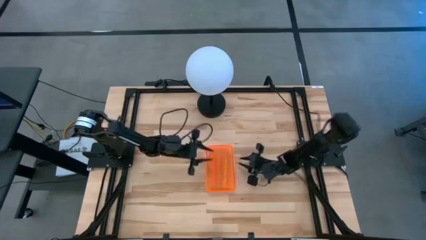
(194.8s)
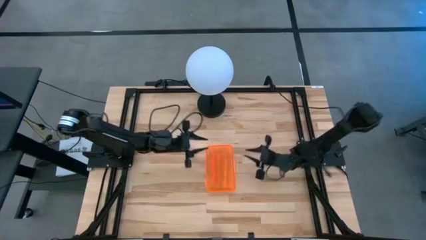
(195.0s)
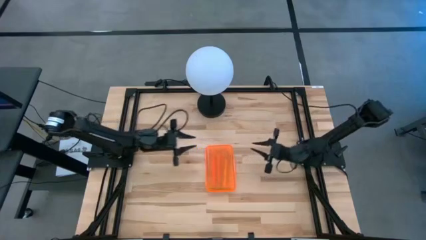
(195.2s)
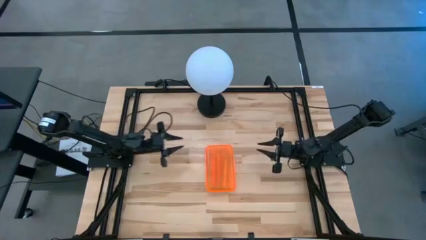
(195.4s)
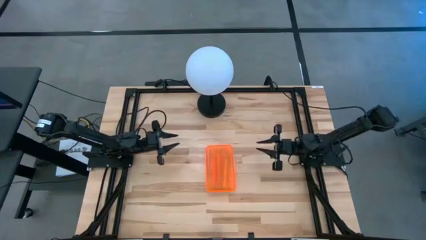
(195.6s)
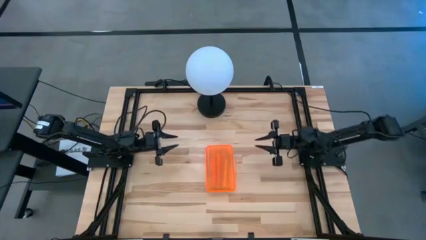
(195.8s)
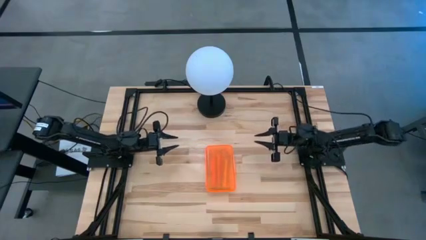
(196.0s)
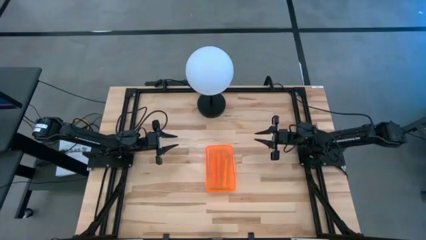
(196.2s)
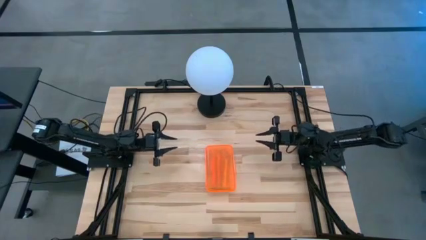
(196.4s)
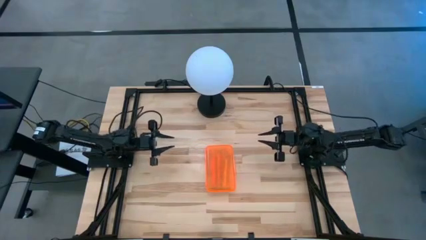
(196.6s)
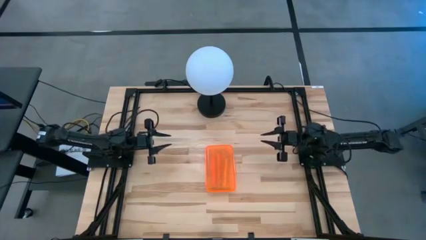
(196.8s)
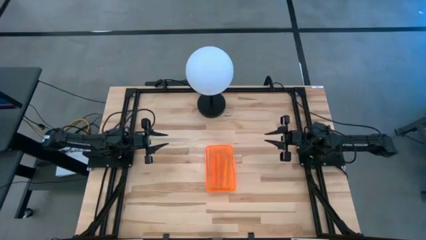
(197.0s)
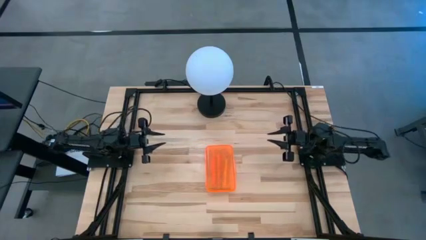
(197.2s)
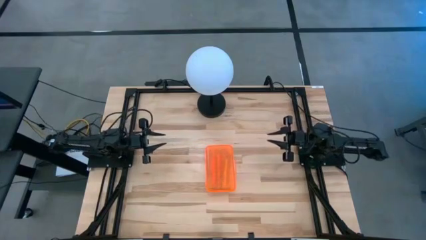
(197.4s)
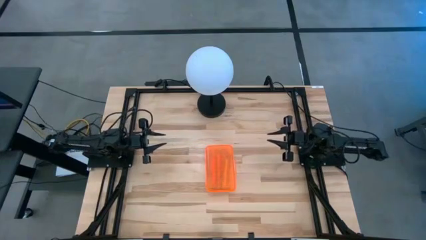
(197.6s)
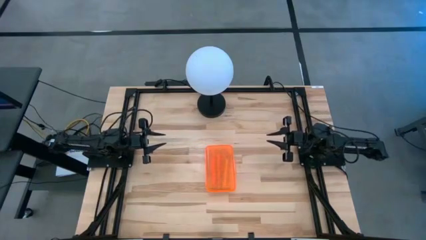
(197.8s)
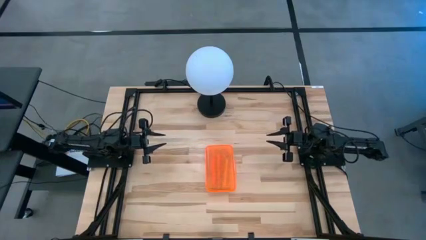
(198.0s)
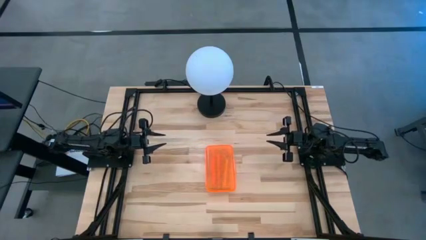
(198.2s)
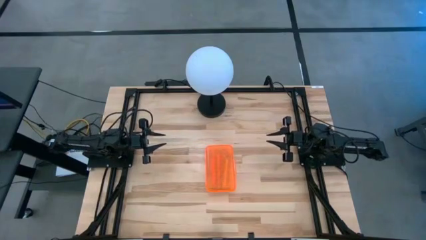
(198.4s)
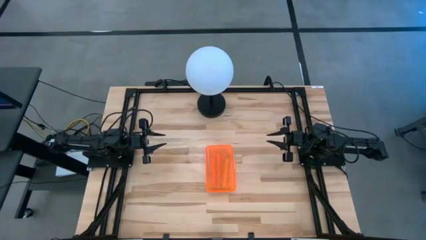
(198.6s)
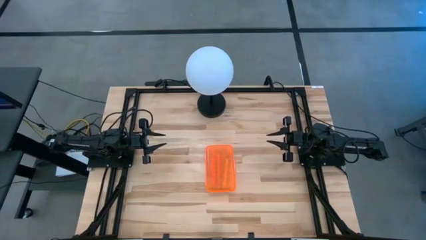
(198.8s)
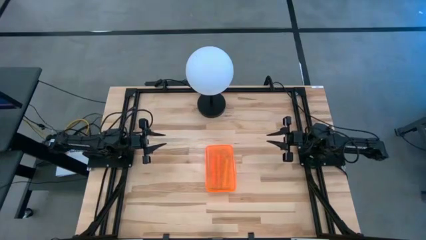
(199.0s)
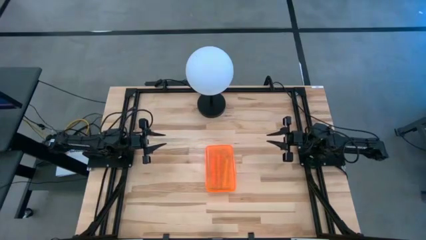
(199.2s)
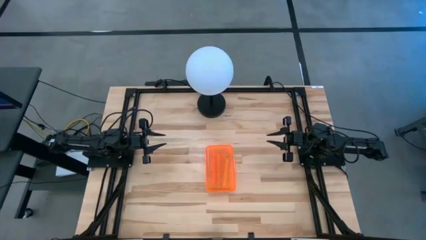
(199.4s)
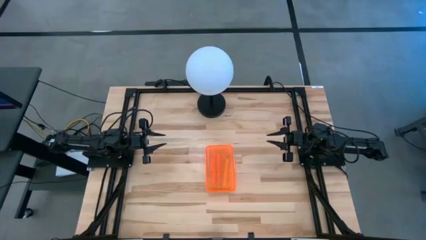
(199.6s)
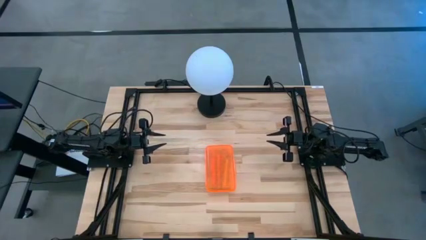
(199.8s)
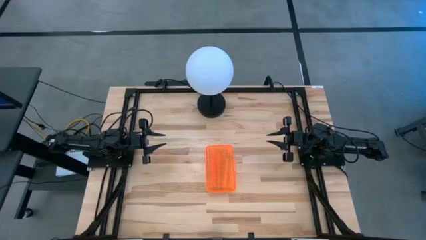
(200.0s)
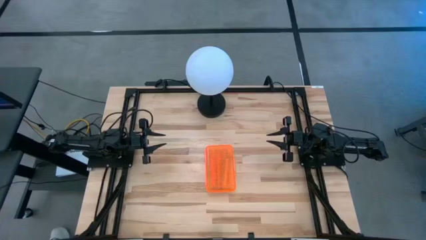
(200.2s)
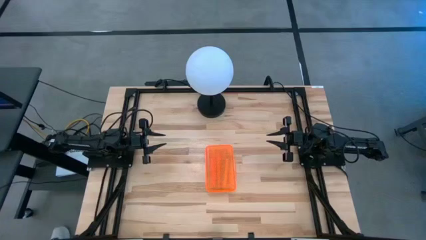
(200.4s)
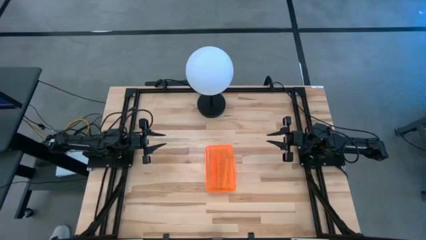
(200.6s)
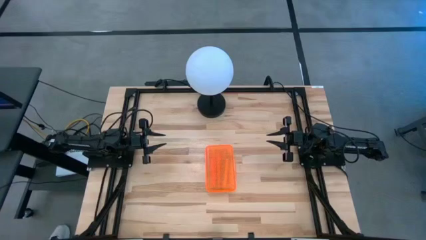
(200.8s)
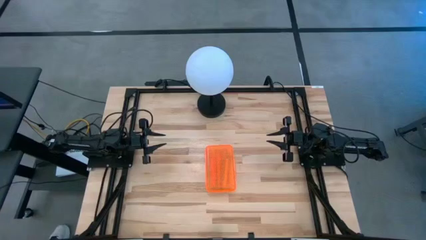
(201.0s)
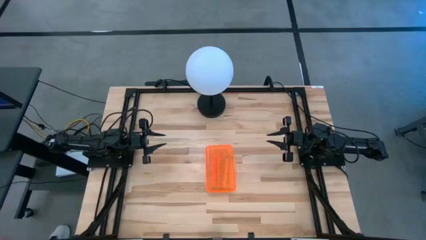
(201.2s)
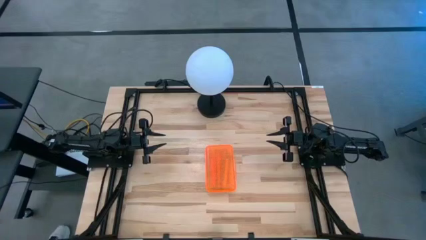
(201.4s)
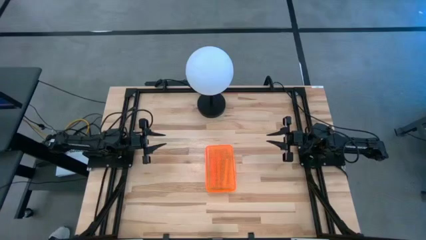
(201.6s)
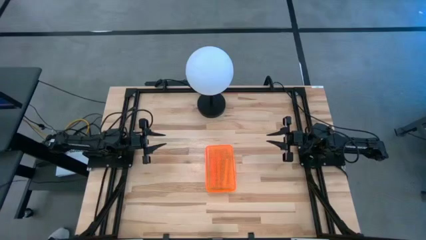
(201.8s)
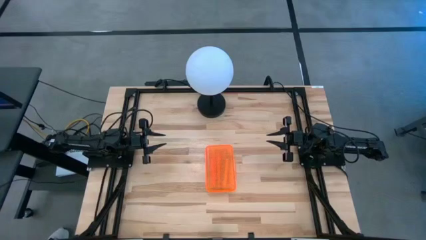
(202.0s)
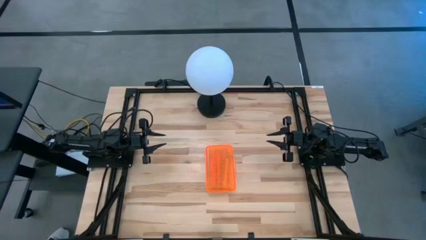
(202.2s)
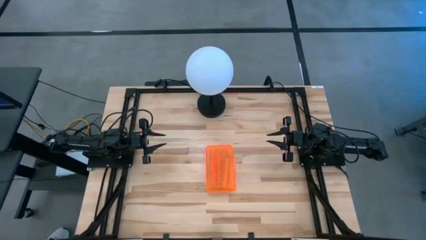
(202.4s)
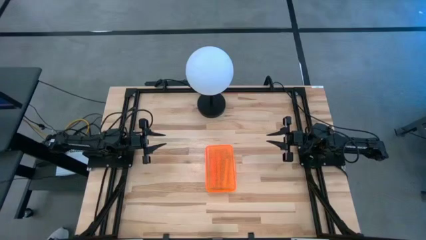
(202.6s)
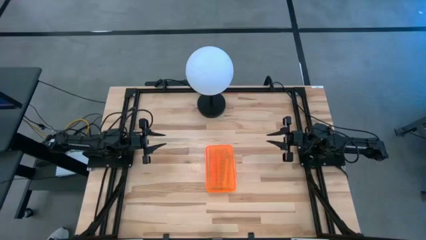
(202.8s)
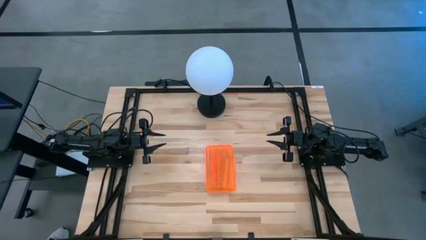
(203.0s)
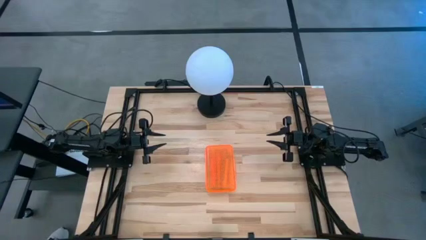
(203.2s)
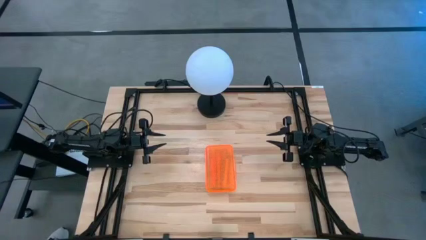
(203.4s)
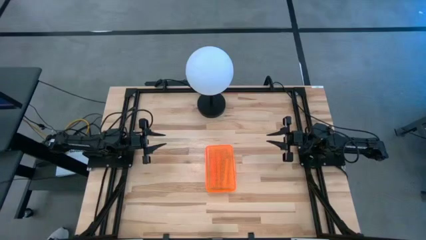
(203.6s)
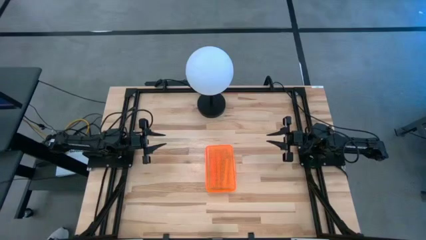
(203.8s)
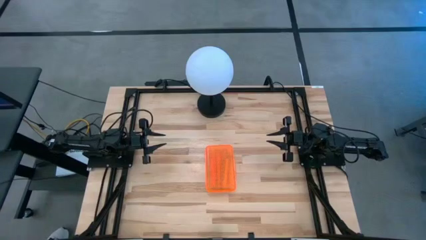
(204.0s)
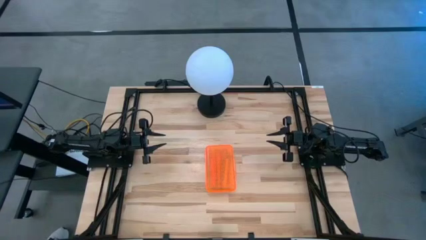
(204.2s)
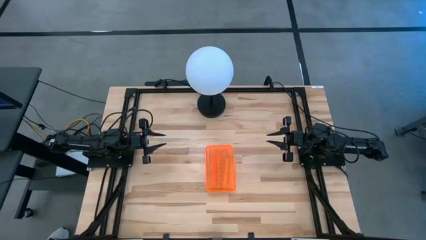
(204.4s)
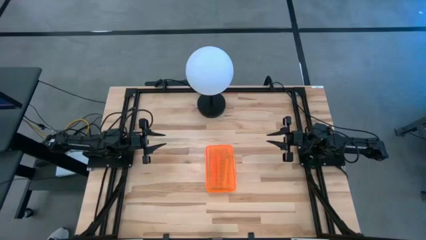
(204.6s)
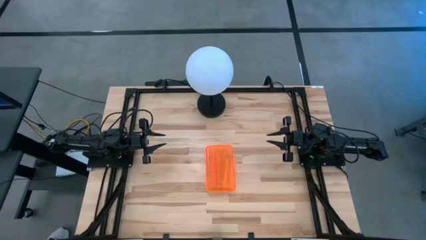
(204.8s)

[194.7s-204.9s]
Task: Pick & place school supplies into a supply box
Return to Home Position

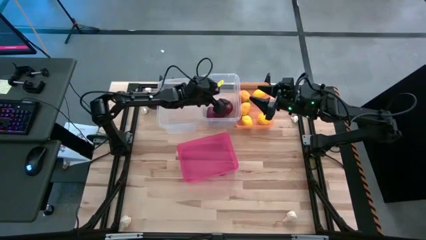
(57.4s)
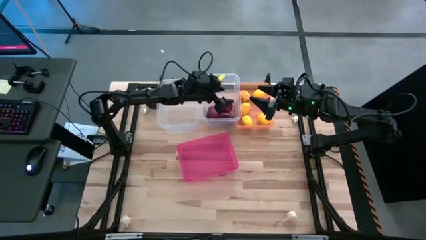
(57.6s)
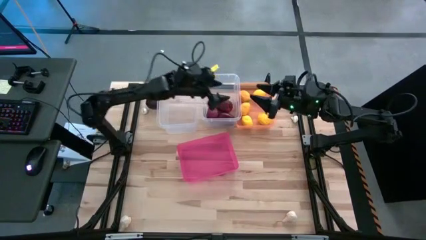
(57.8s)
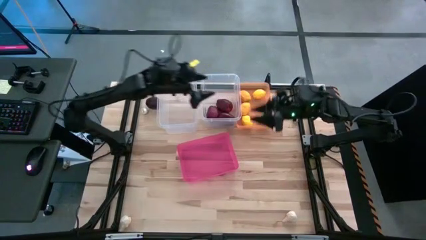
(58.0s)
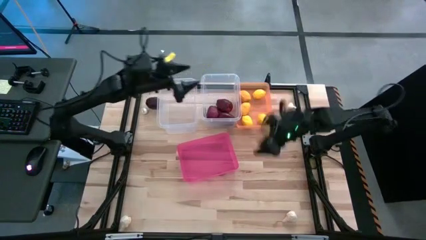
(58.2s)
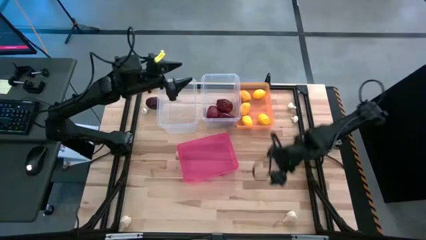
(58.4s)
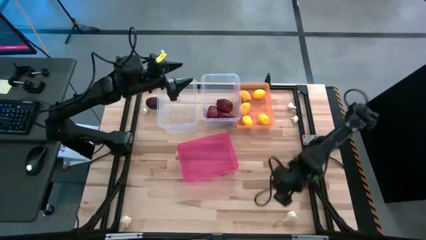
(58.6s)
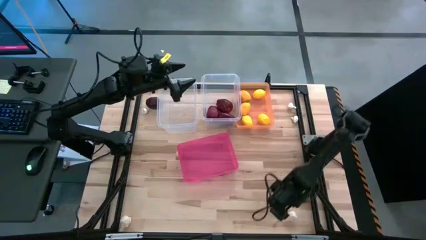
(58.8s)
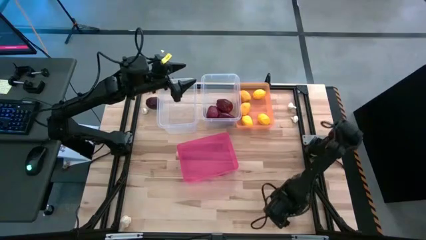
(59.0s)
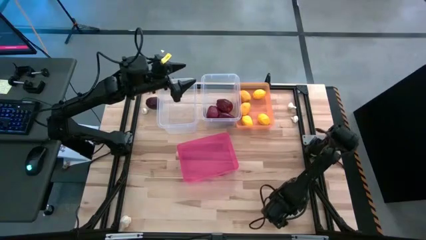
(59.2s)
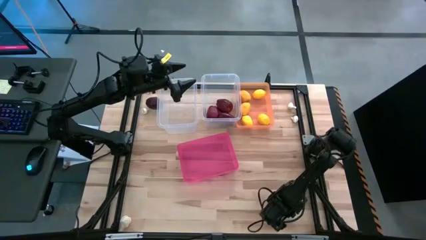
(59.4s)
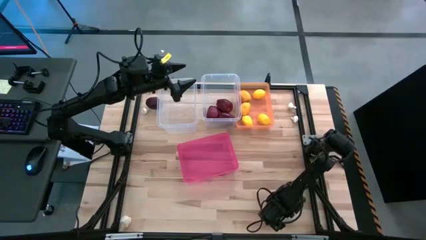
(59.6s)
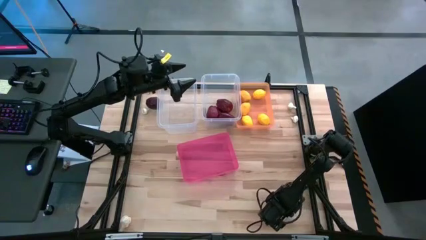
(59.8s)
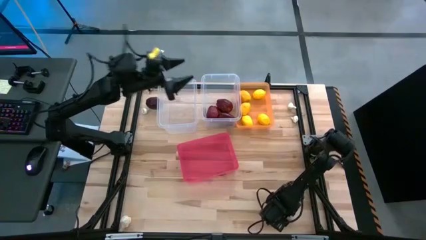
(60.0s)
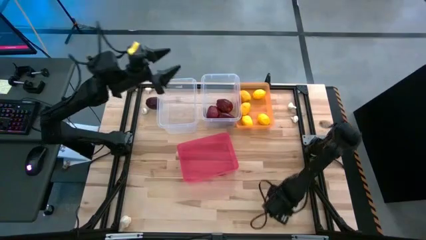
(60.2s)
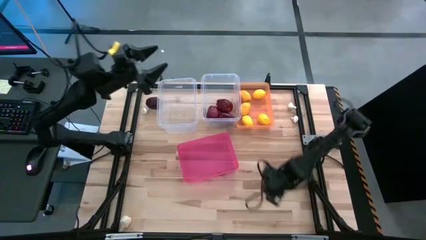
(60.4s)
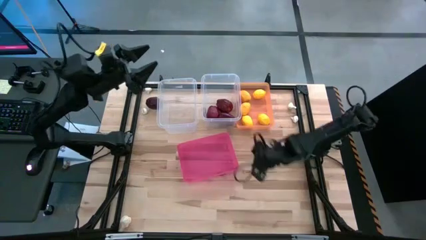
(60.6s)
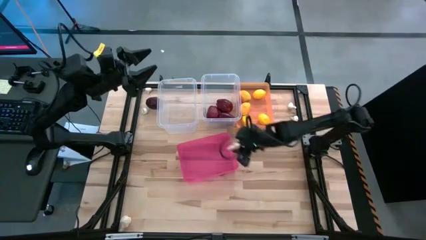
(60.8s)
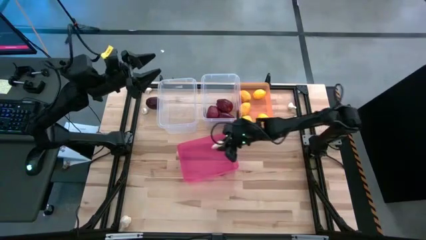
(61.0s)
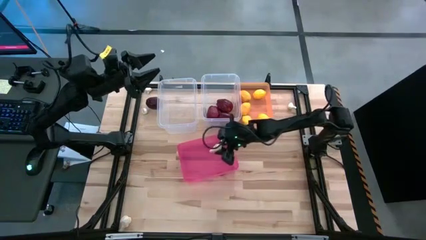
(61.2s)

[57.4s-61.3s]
Task: Sort produce into baskets
Put the white garlic into the pink bin

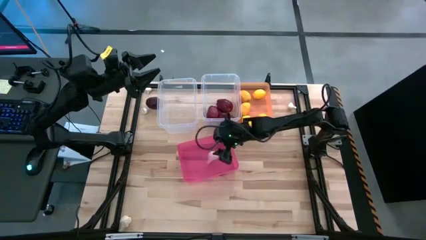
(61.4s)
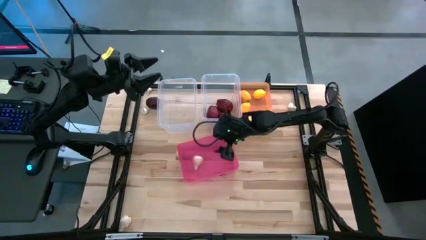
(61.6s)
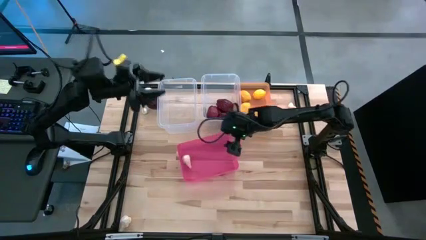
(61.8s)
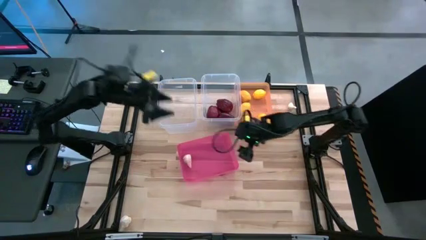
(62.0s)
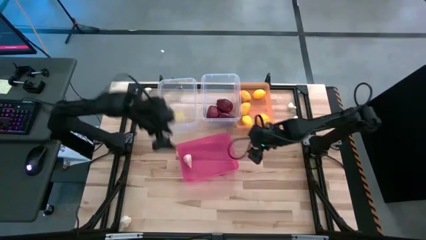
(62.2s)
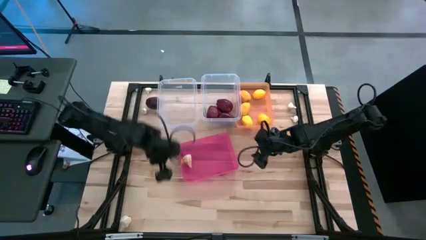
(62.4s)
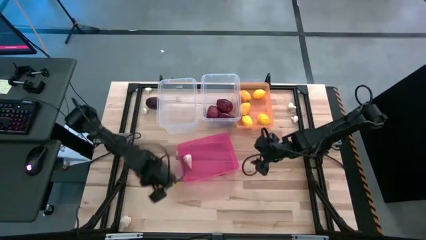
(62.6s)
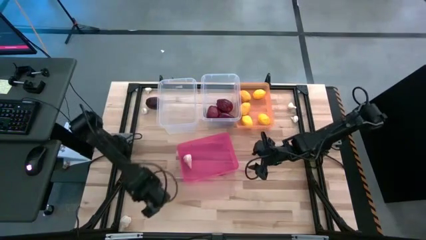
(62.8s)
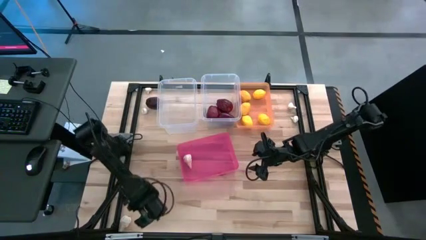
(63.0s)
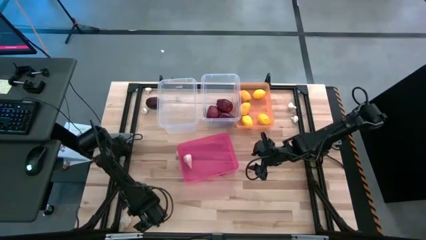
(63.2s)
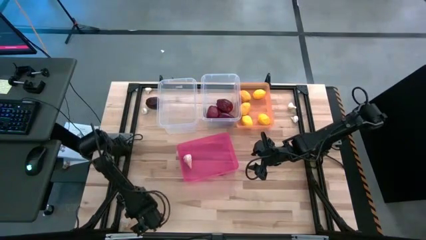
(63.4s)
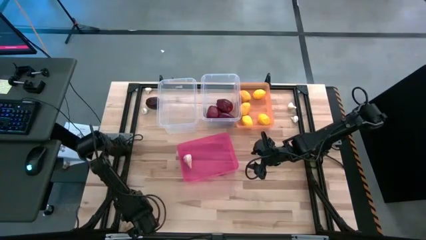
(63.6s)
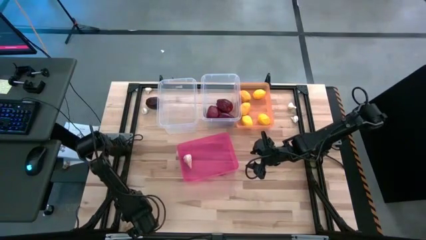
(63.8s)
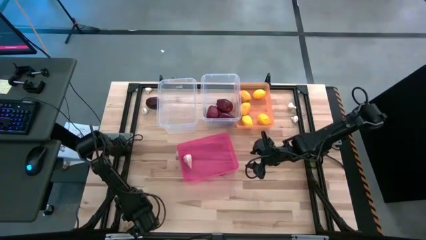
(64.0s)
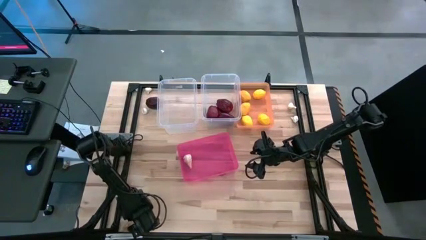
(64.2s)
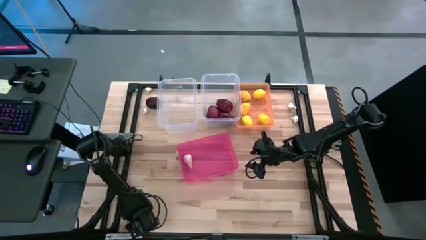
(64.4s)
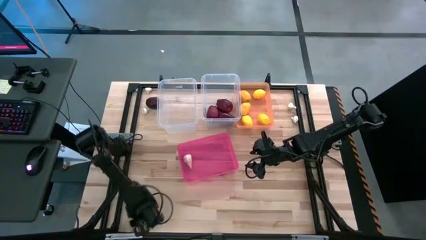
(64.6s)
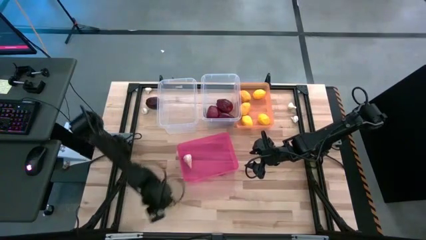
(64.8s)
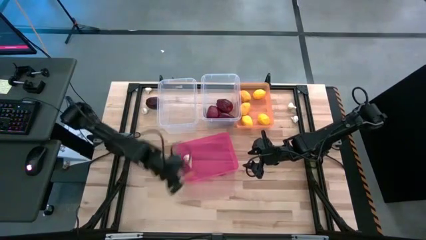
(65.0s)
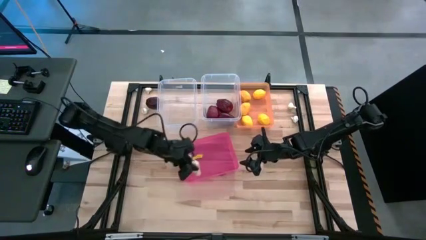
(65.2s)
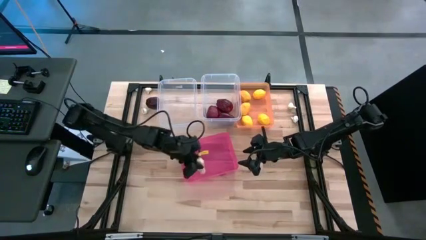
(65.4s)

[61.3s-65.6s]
Put the white garlic into the pink bin
